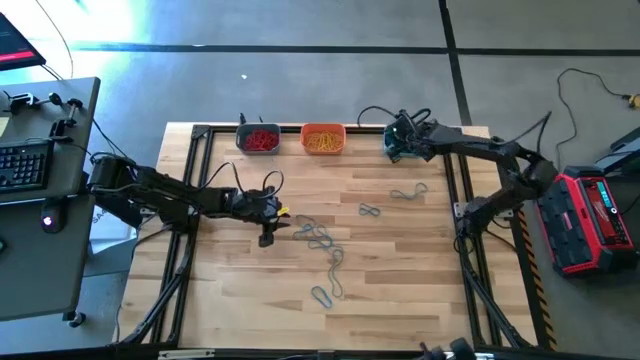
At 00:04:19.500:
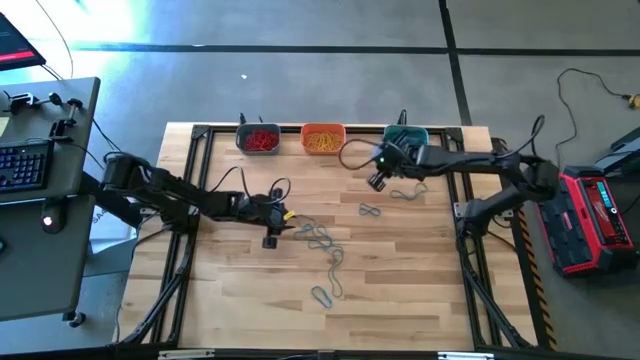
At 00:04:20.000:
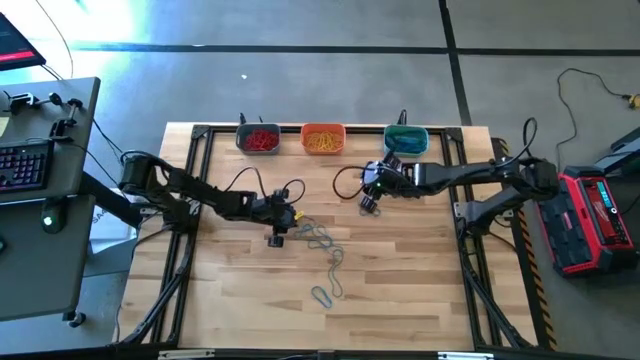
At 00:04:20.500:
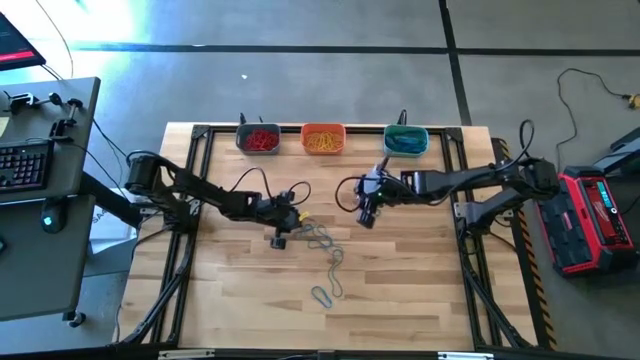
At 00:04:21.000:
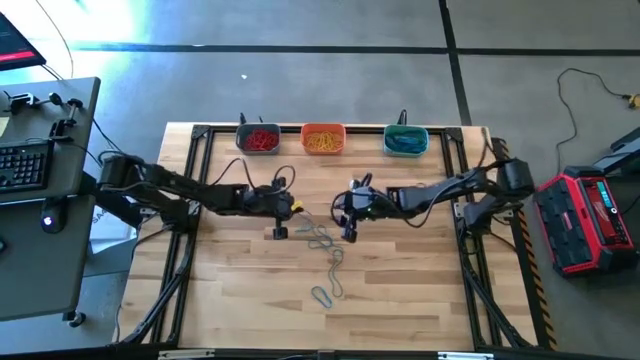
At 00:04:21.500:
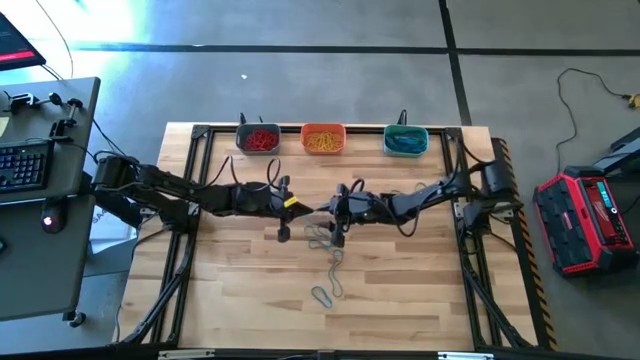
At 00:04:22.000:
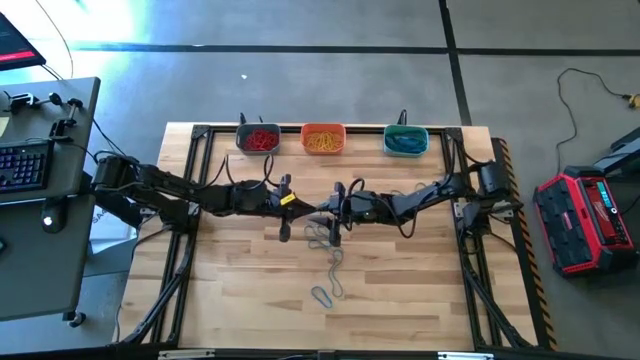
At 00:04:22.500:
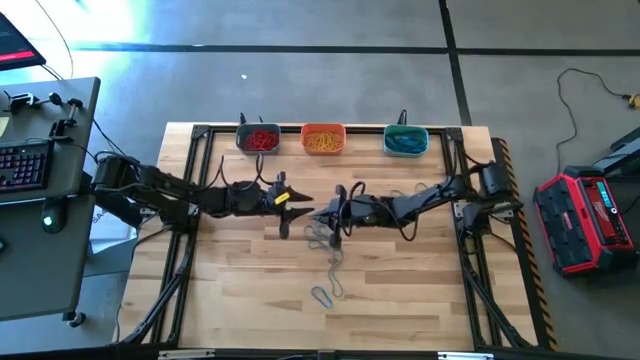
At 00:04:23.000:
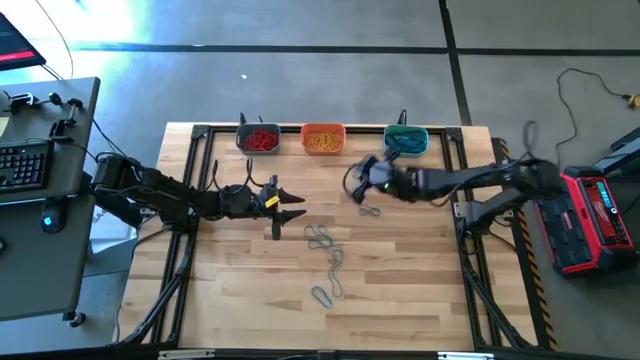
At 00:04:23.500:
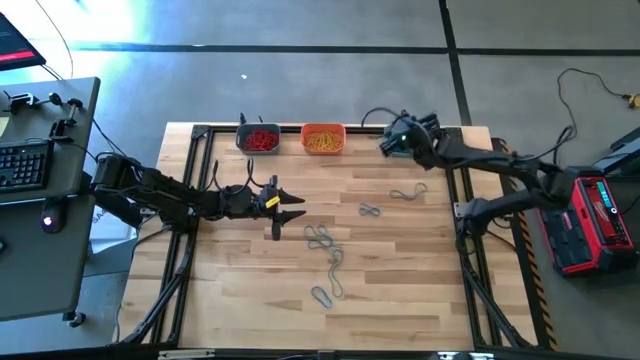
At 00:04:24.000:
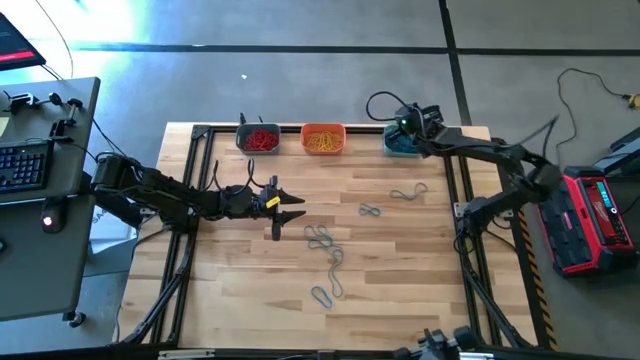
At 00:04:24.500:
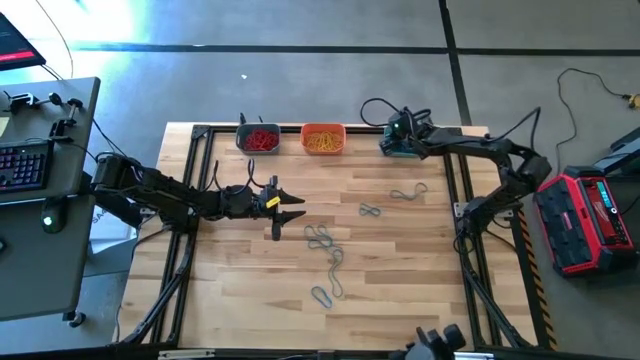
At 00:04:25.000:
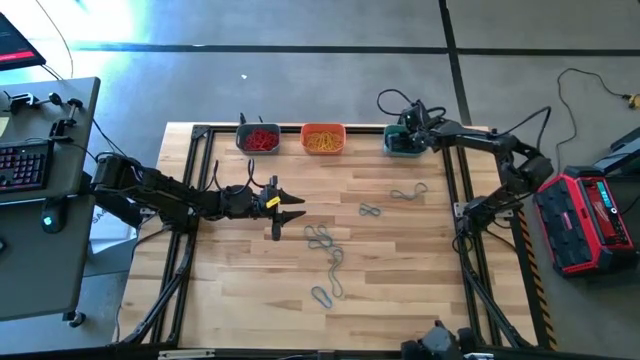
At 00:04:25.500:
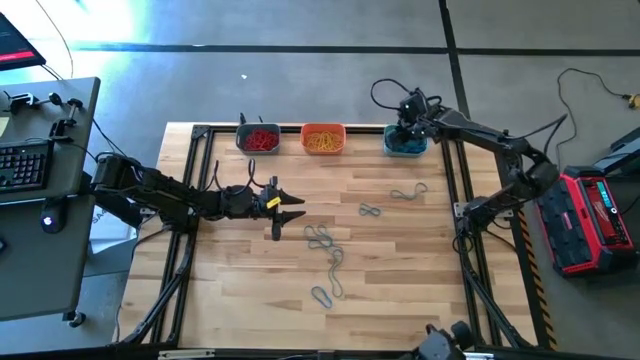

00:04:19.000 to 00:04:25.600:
Task: Sort rubber bands into baskets
Put the blue rubber band into the light blue bin

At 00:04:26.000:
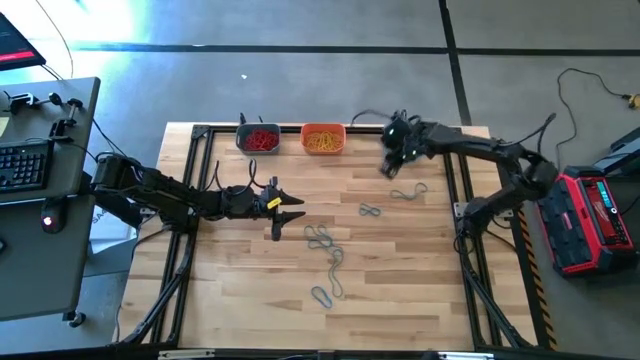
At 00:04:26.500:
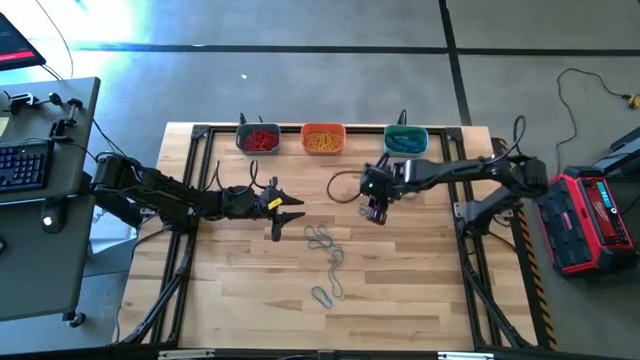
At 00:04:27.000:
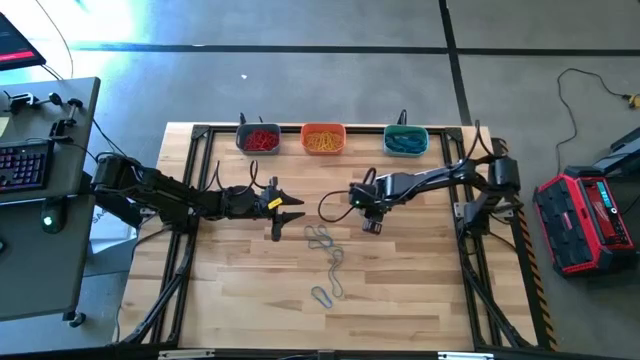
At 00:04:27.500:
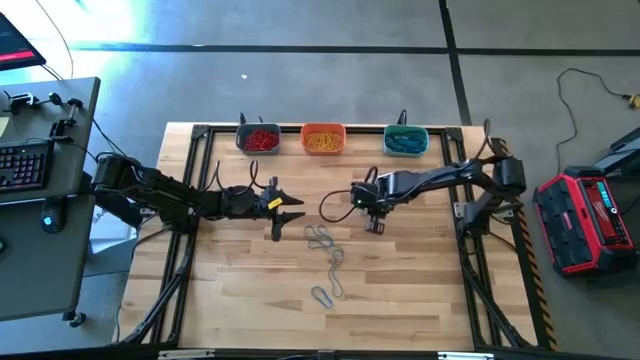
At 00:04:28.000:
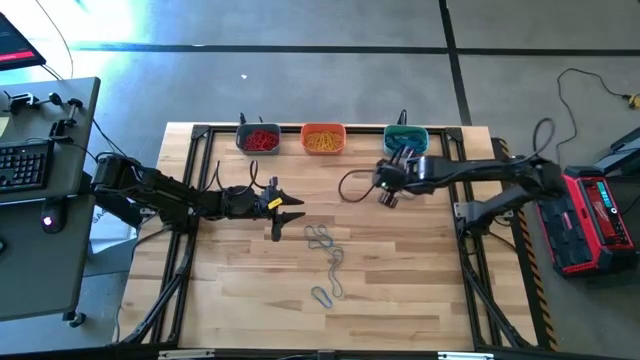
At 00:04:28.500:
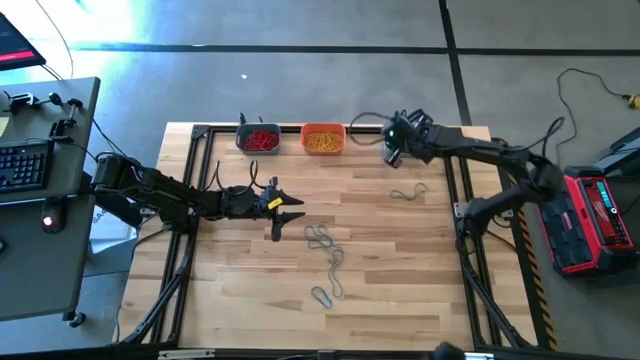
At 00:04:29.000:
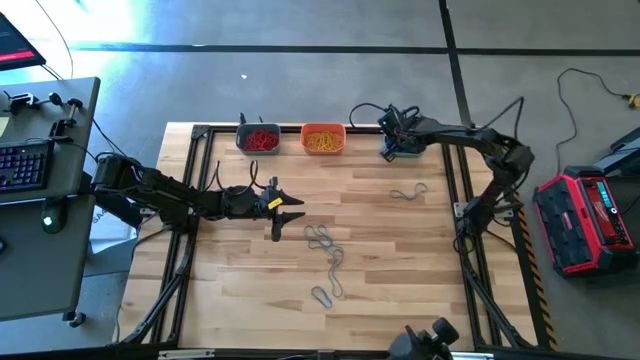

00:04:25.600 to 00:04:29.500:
Put the blue rubber band into the light blue bin

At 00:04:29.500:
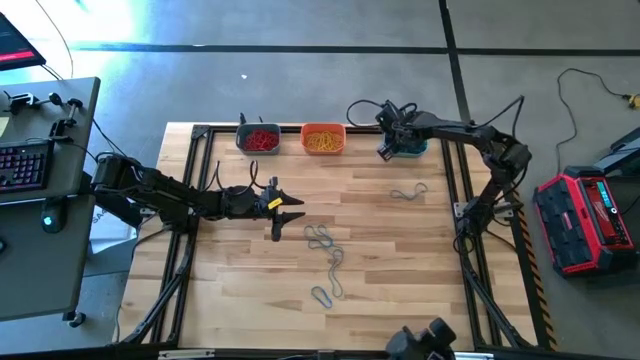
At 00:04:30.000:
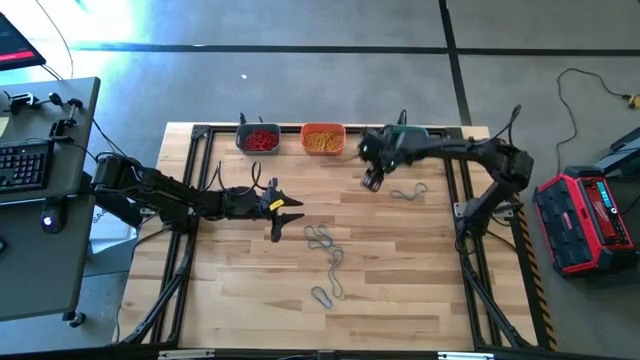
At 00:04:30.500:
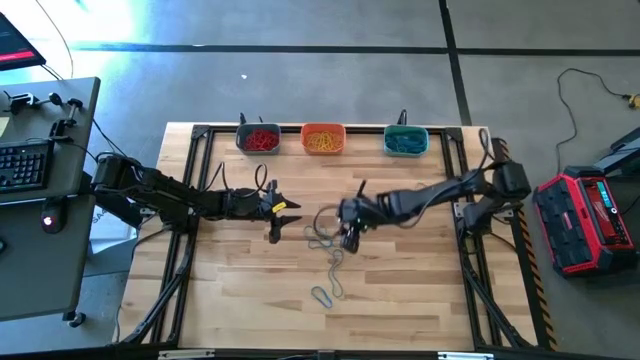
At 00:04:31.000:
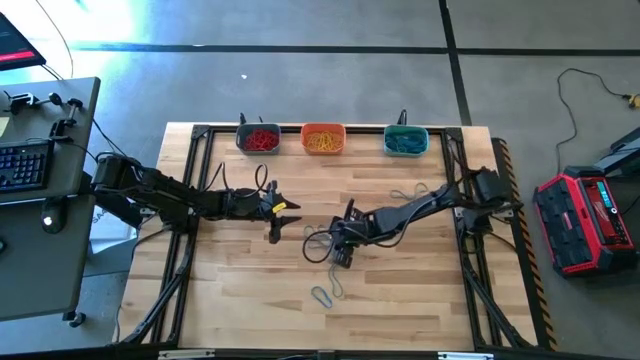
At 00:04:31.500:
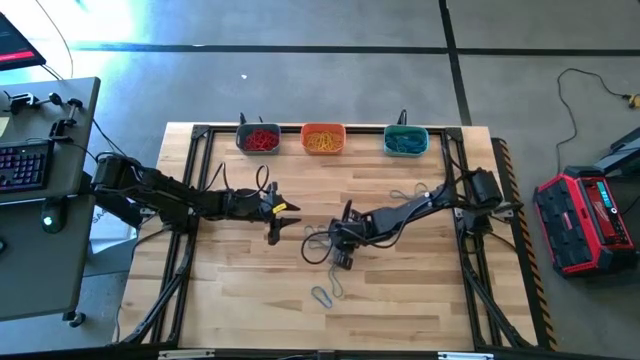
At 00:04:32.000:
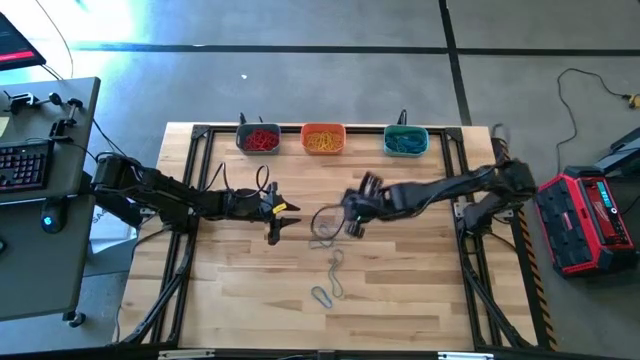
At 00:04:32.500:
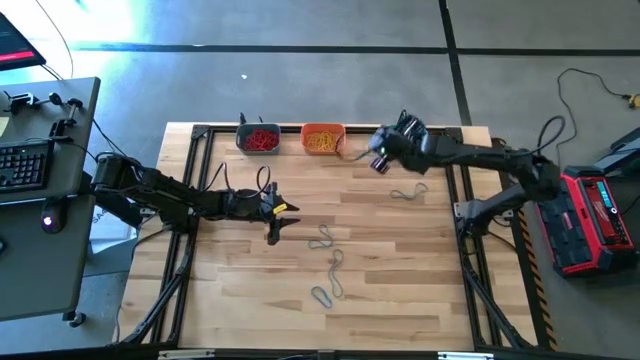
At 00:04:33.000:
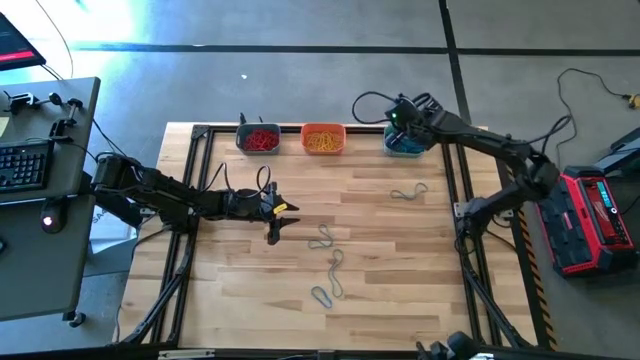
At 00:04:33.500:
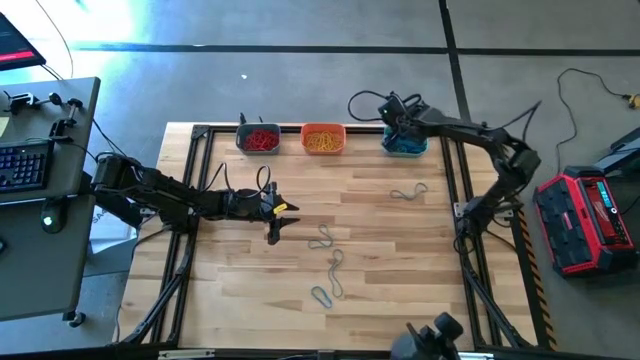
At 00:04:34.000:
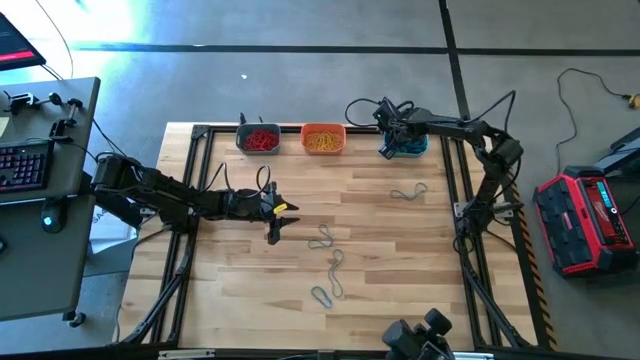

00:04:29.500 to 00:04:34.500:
Put the blue rubber band into the light blue bin

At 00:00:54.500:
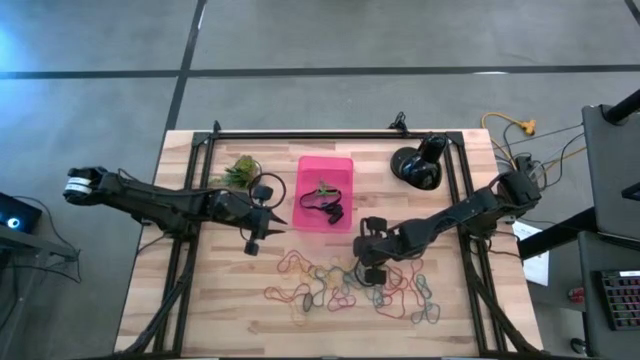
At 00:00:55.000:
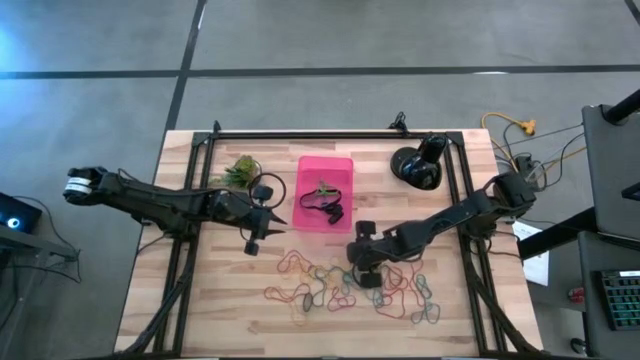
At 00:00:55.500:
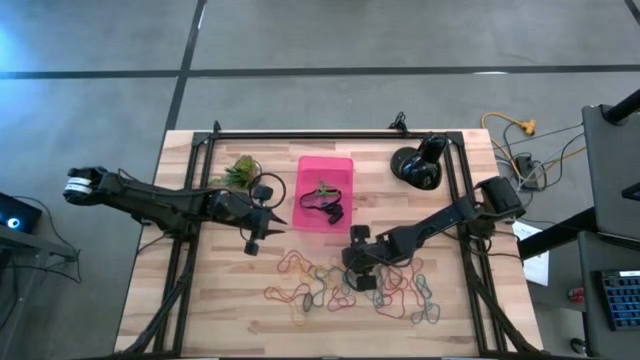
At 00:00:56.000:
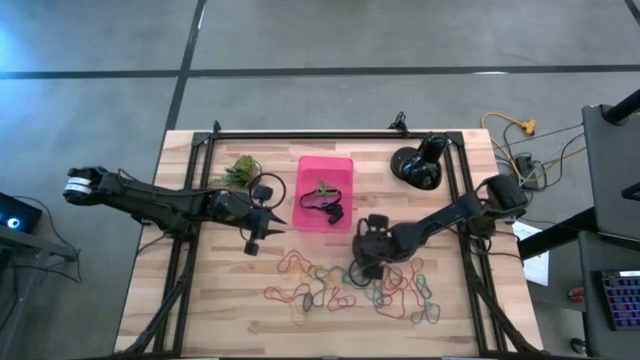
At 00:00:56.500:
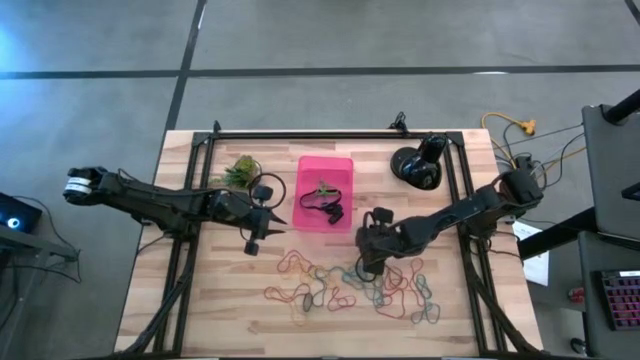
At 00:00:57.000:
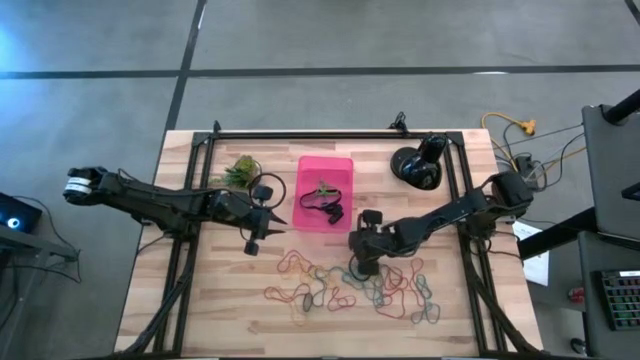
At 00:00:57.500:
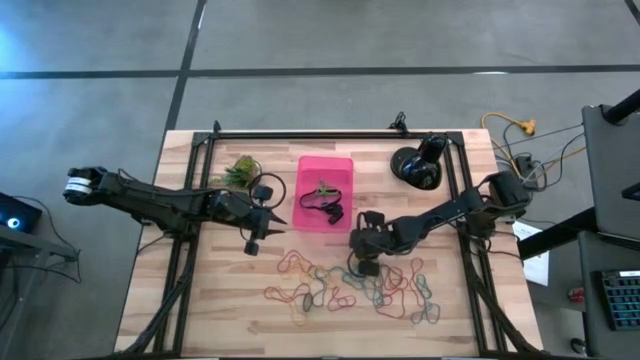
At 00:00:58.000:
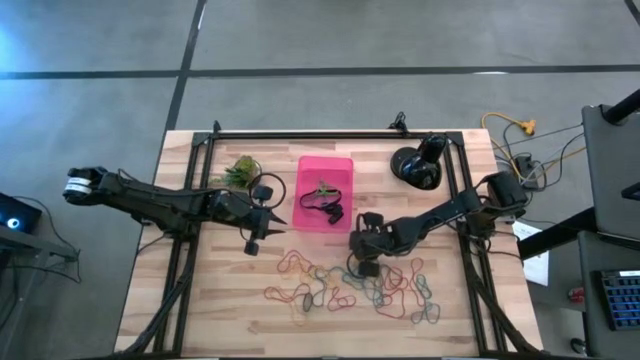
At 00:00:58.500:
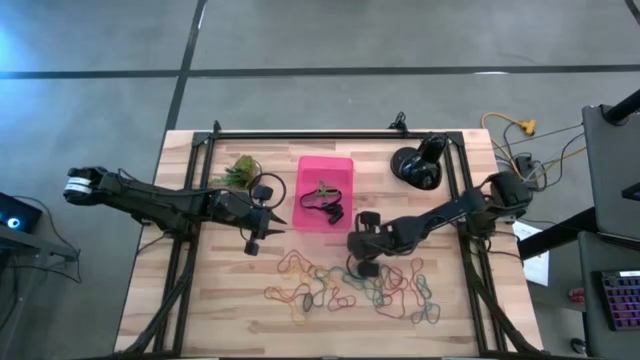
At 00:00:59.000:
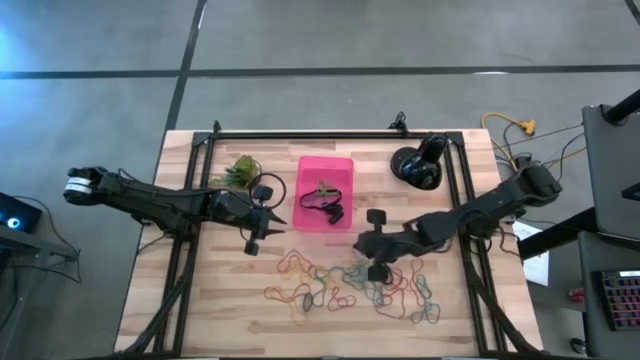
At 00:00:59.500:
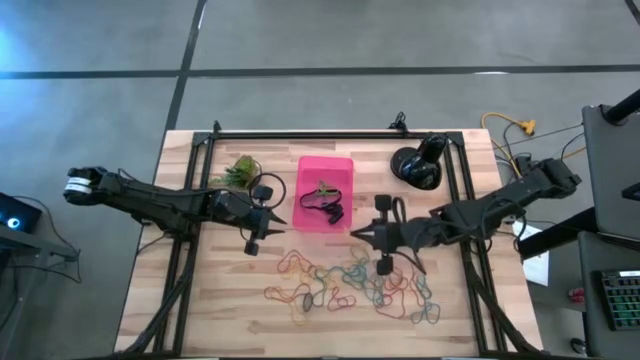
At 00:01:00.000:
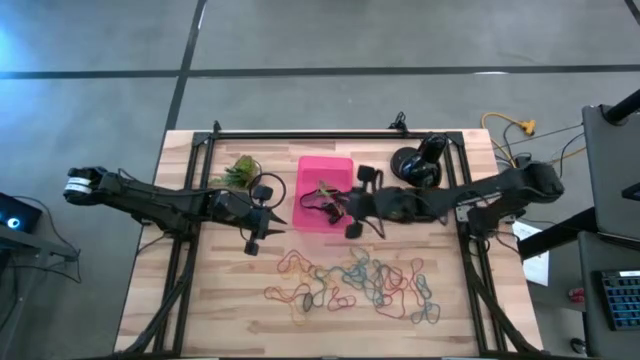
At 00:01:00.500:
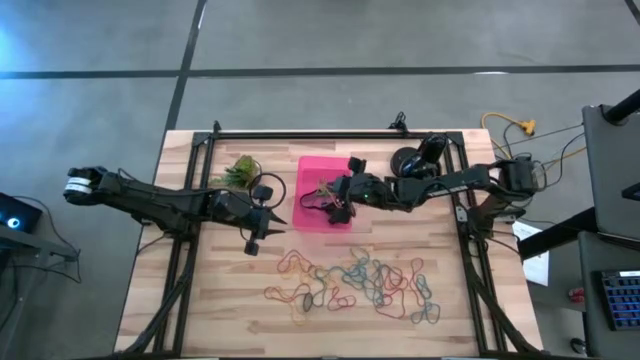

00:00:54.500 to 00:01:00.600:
Task: Pick and place rubber bands into bin
Put the yellow rubber bands into the pink bin
